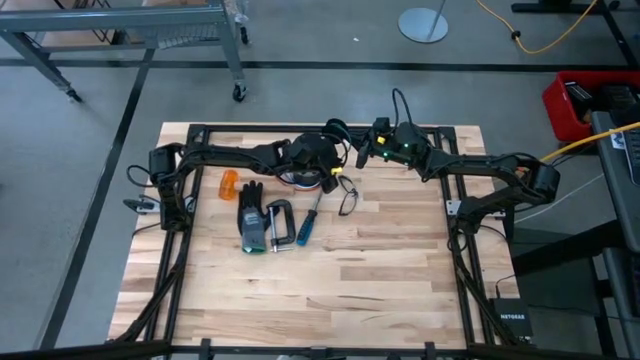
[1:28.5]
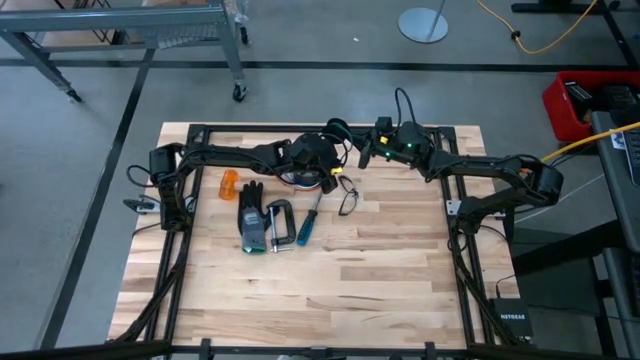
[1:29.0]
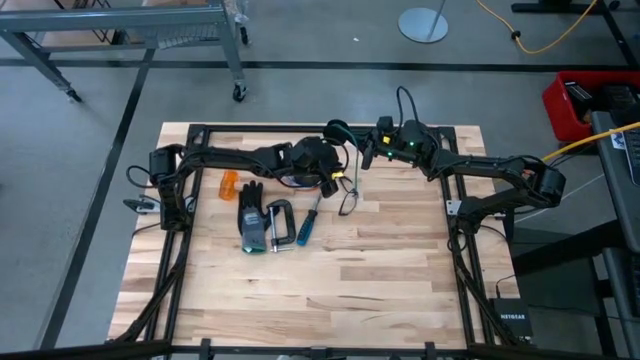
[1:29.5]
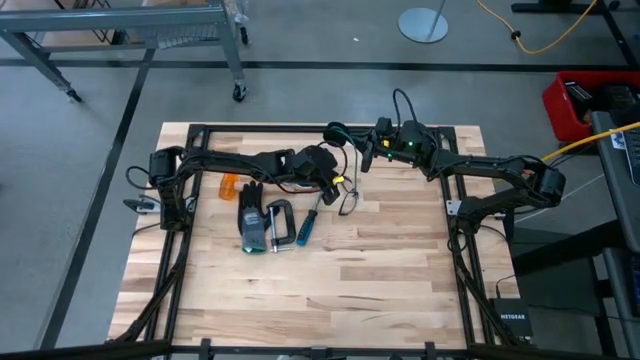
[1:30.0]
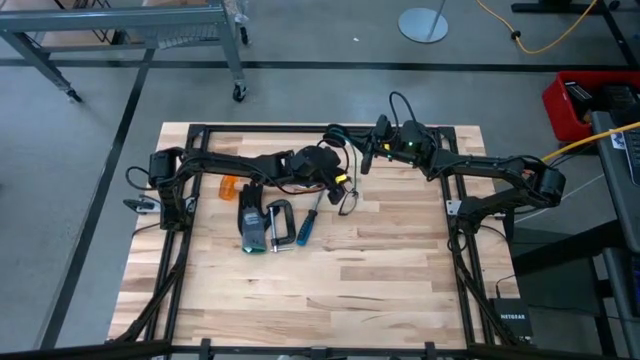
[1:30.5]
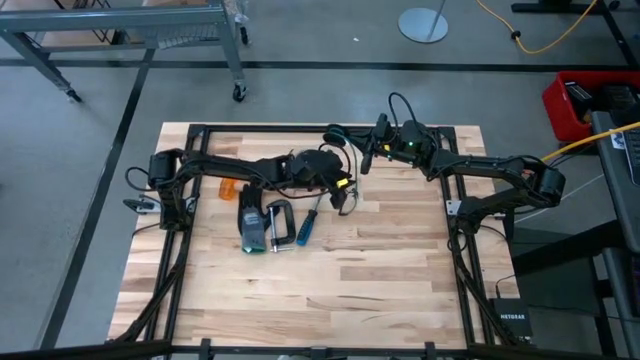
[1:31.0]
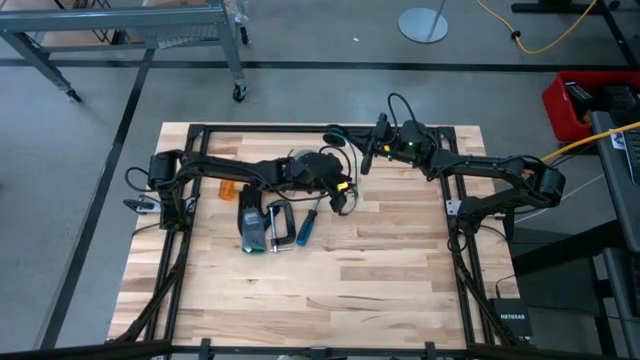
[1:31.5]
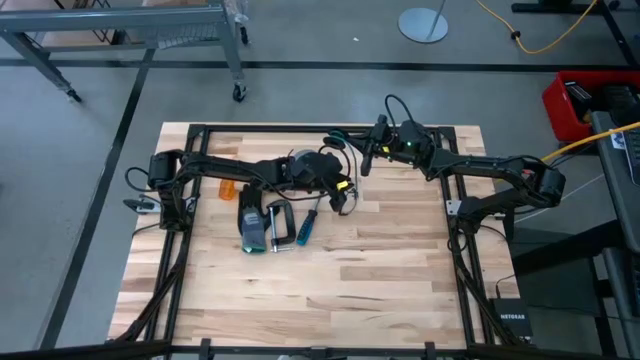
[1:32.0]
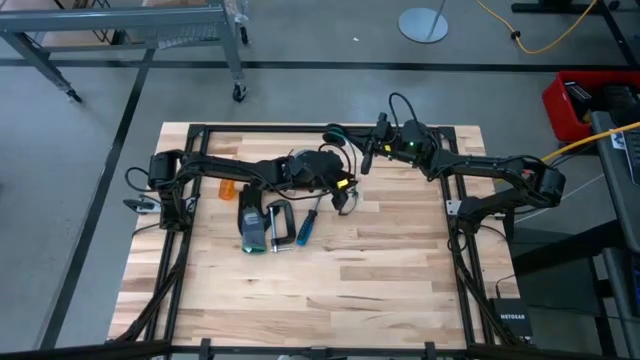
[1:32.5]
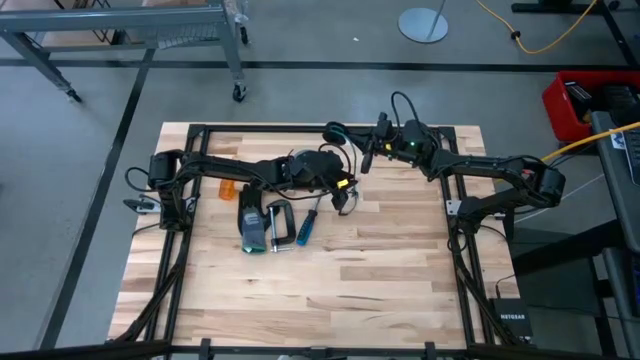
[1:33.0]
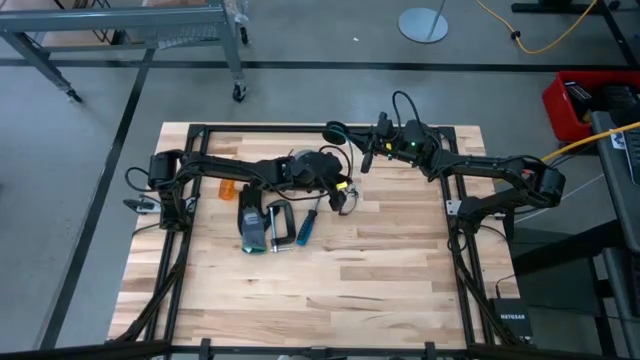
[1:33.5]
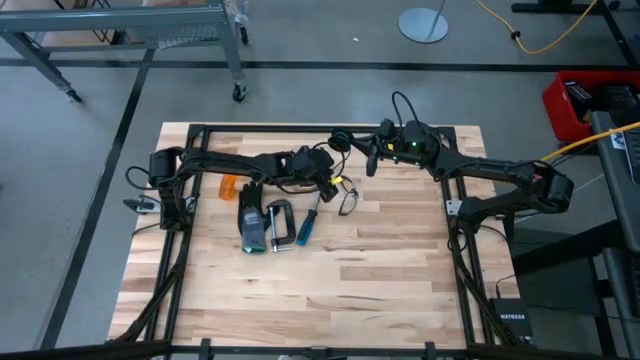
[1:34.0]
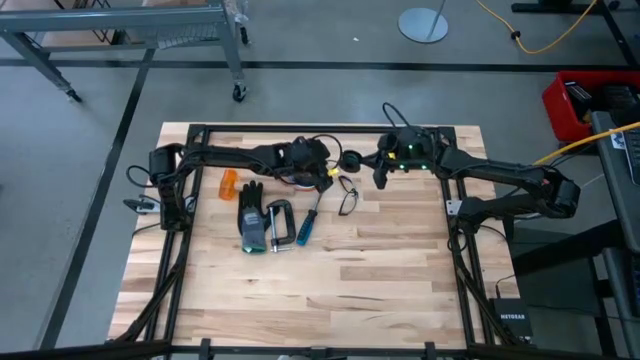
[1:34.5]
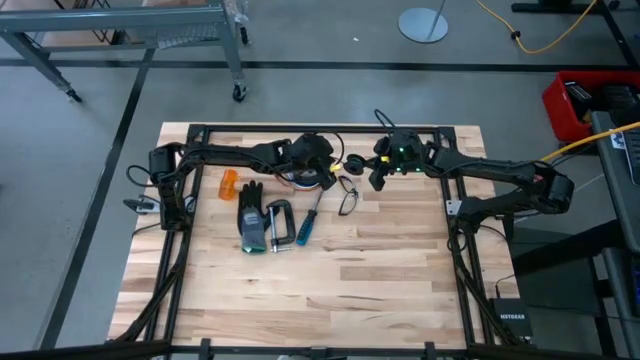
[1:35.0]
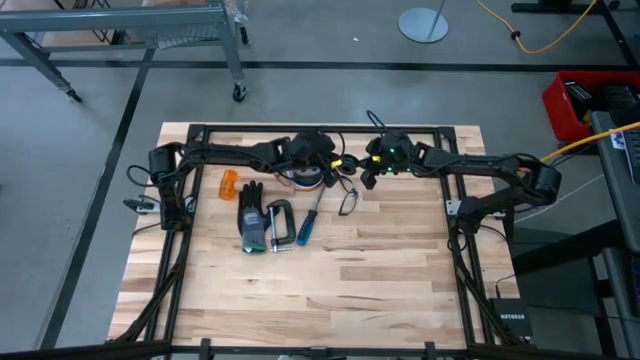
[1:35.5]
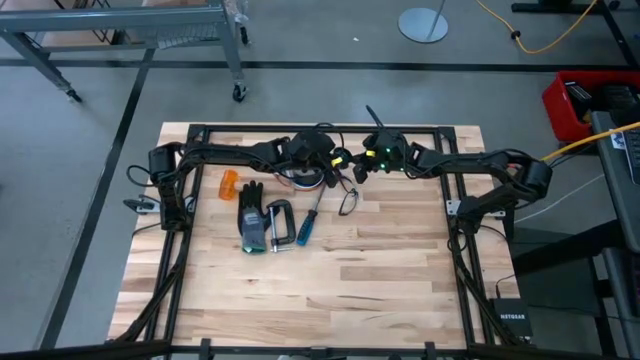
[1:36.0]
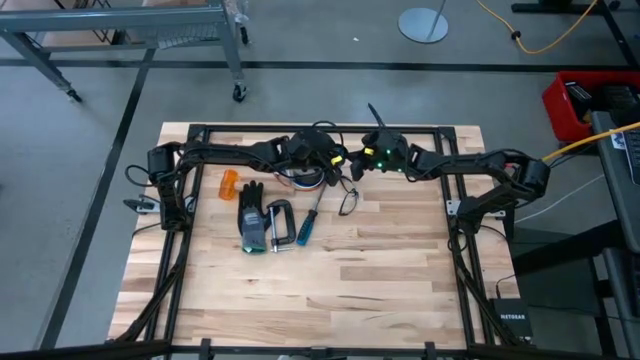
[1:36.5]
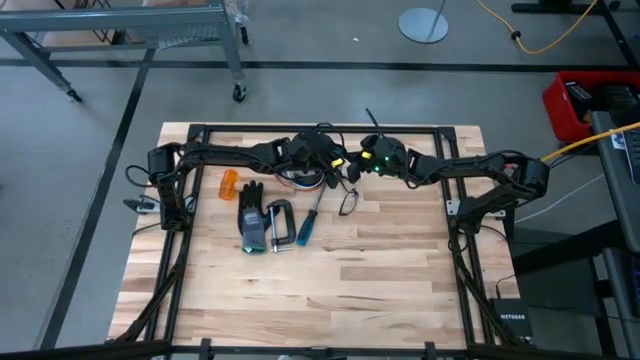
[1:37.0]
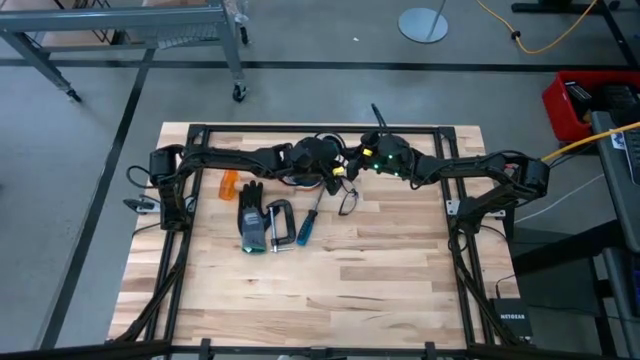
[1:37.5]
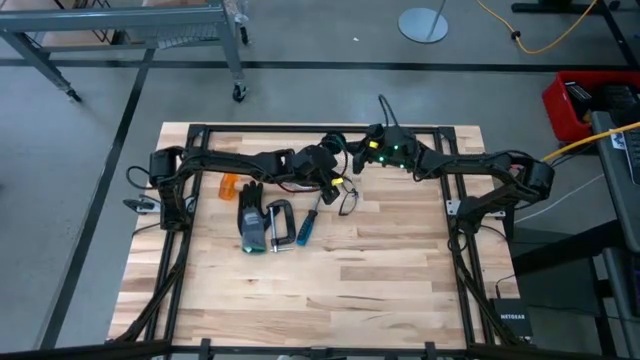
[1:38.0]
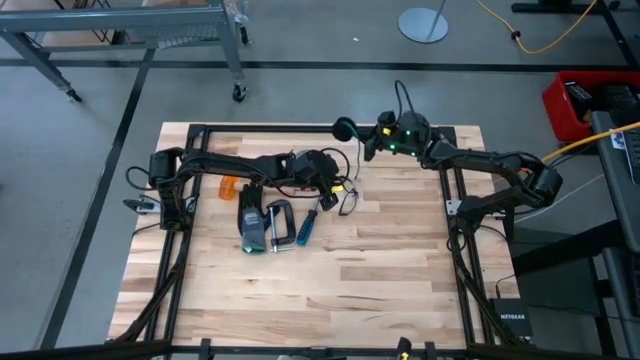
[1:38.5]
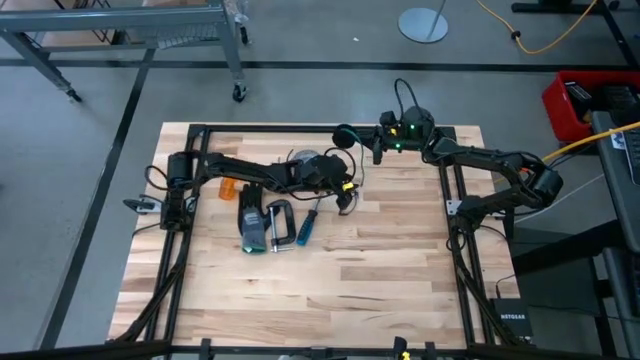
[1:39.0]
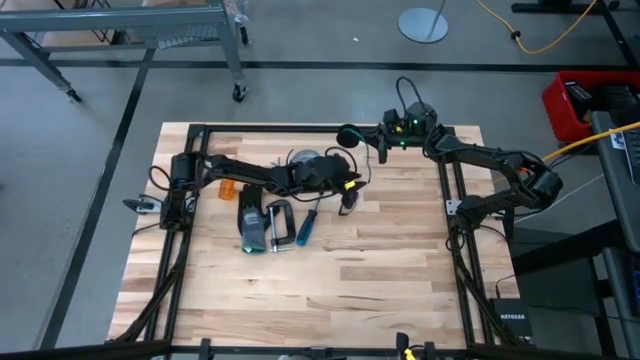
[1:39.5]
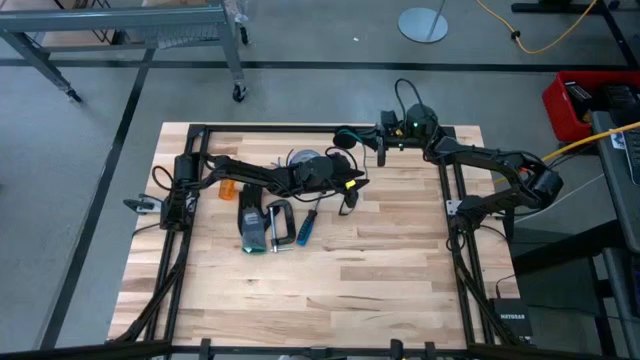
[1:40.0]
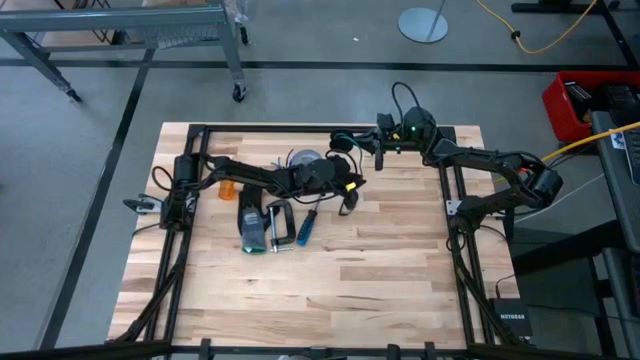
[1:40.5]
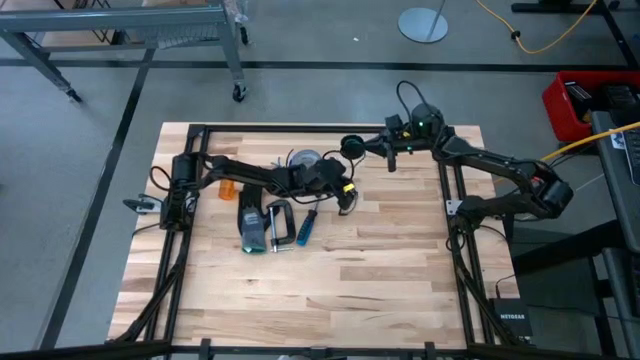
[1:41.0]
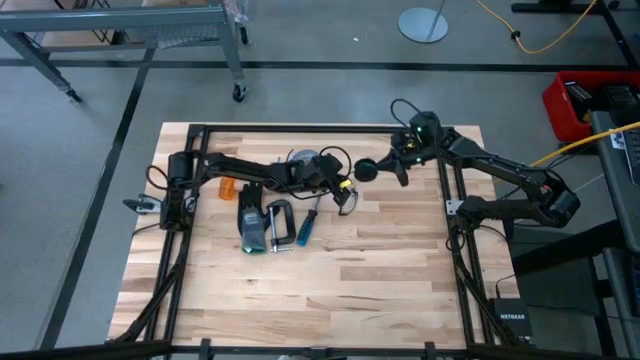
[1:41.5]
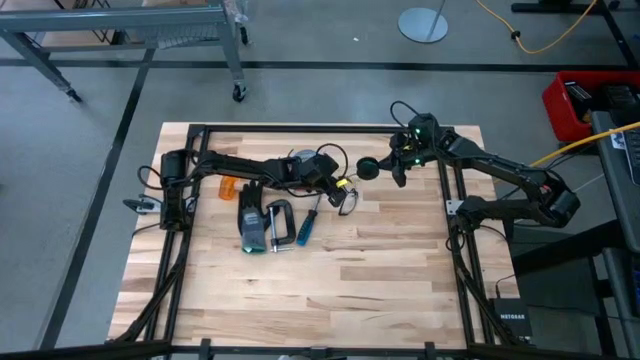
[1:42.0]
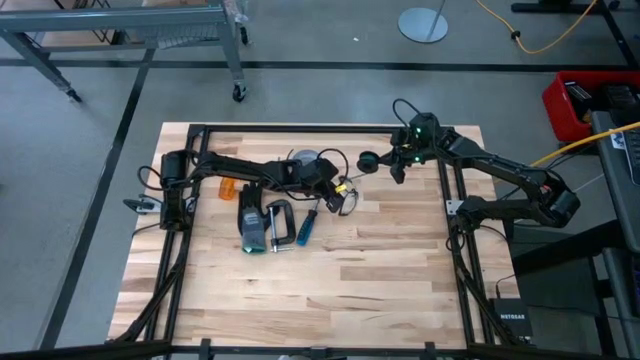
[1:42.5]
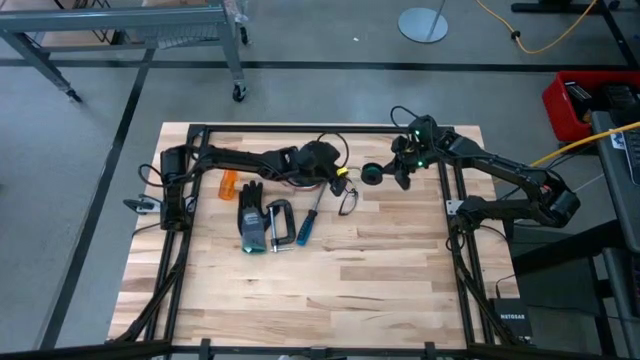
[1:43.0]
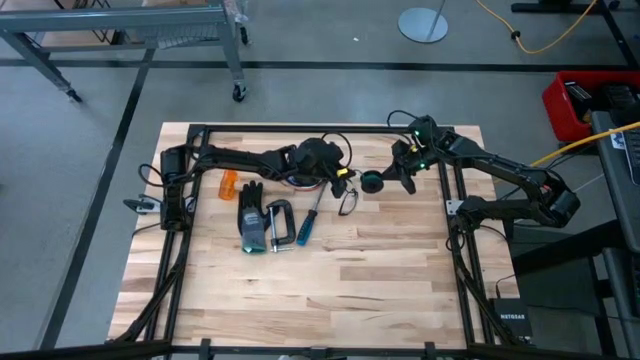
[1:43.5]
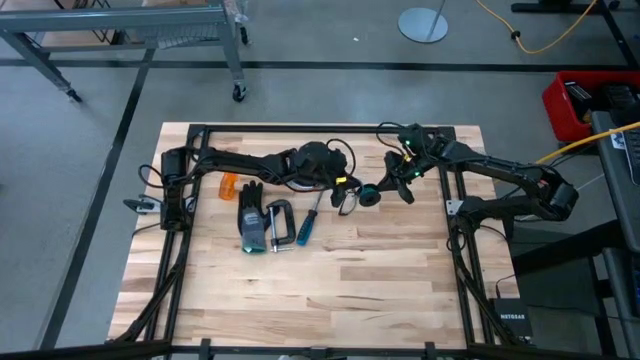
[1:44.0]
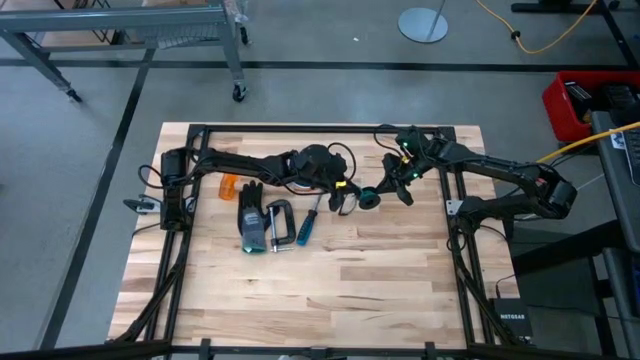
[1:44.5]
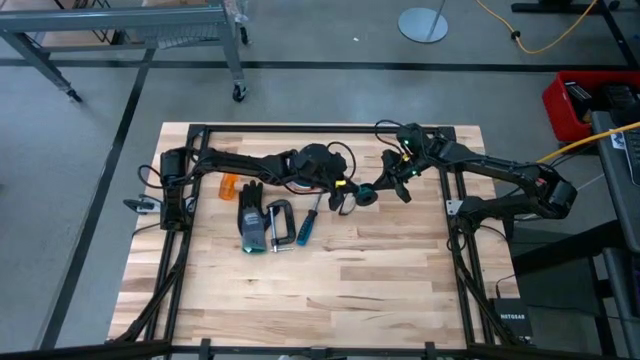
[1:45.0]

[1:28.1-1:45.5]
Task: Coil cords
Coil the wire in the cable spool

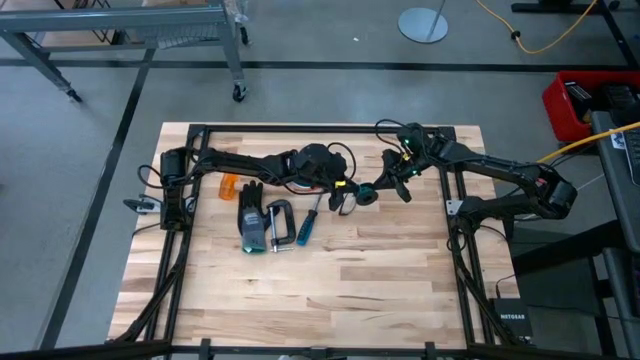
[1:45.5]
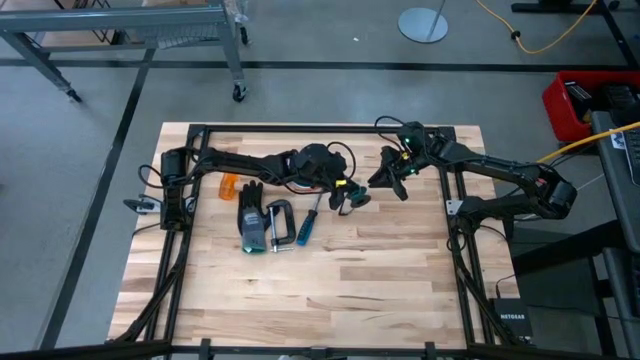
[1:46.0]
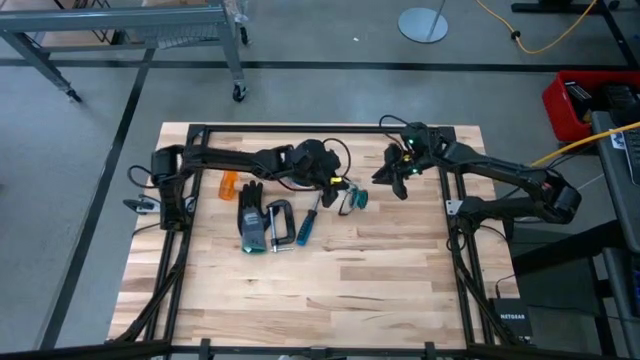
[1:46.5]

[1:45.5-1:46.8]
Coil the wire in the cable spool

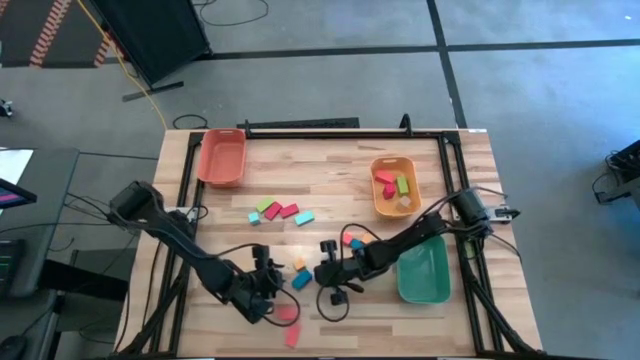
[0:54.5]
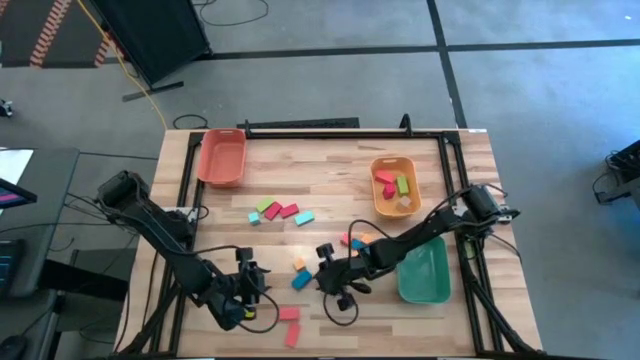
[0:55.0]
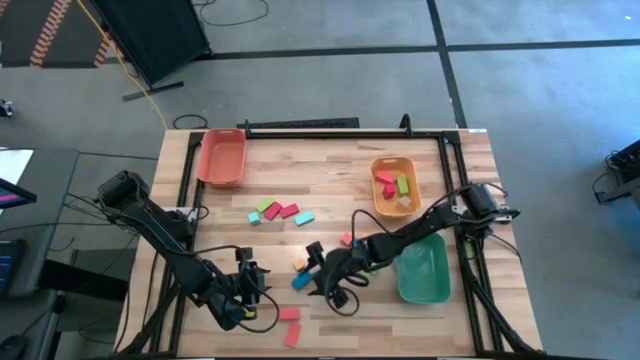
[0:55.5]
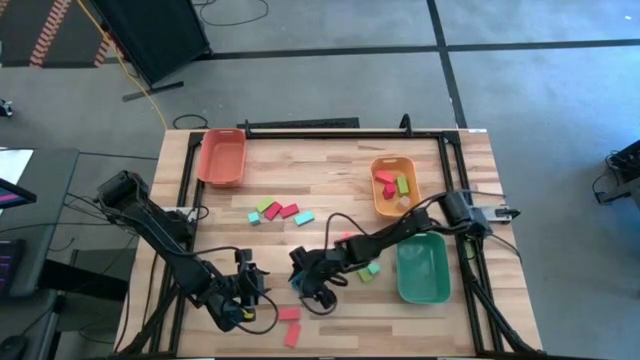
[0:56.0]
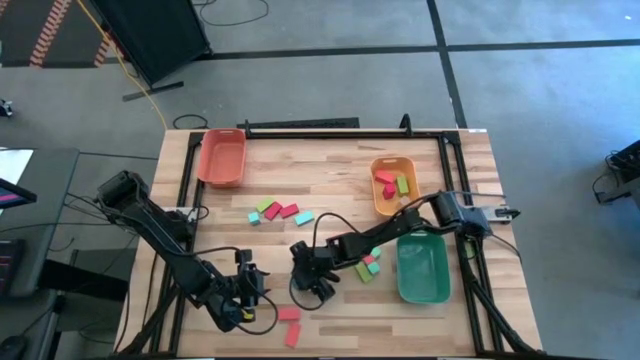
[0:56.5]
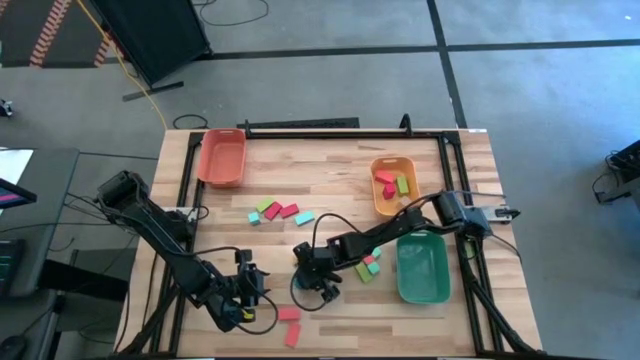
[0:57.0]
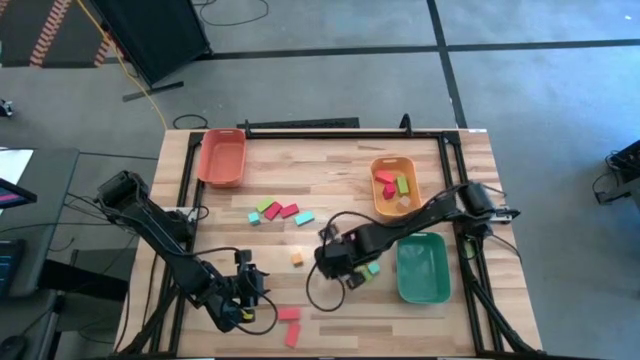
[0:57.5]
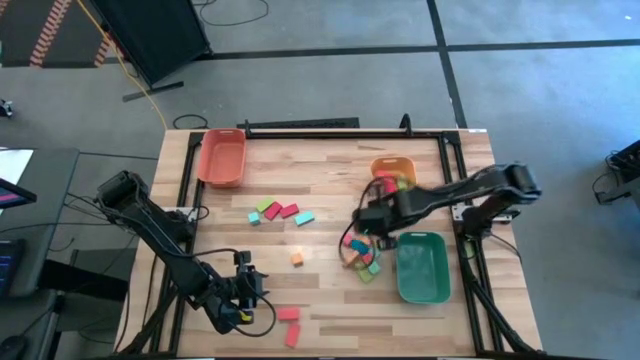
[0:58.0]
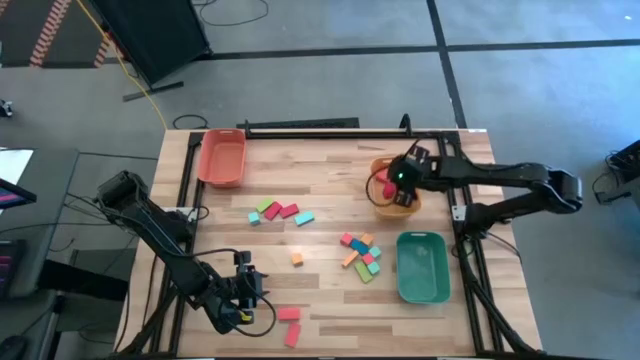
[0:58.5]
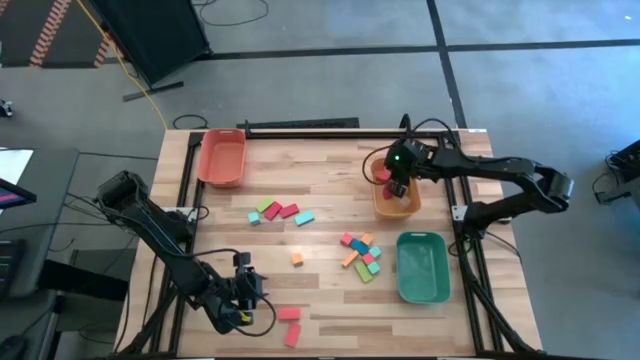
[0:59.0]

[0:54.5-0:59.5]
Task: Sort blocks by size
Put the large rectangular dark blue block into the yellow bin
